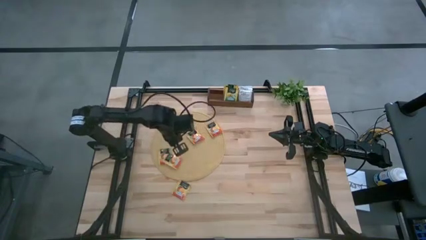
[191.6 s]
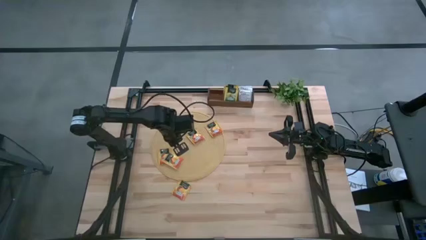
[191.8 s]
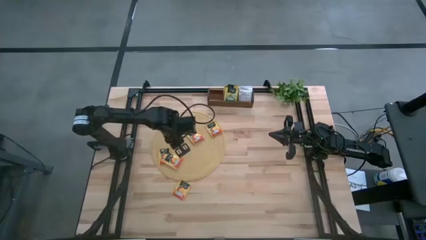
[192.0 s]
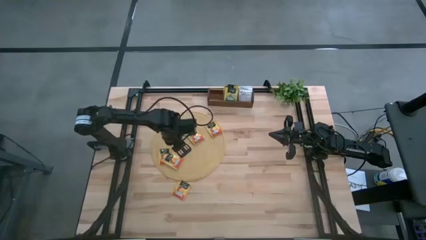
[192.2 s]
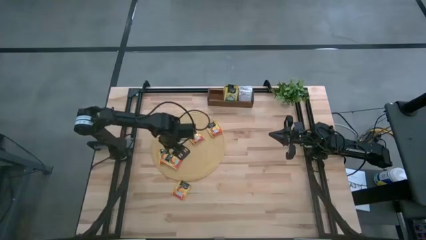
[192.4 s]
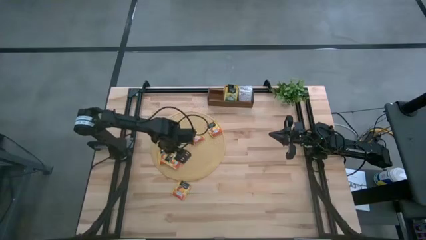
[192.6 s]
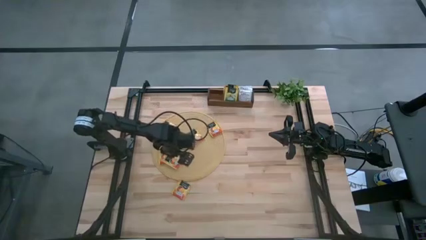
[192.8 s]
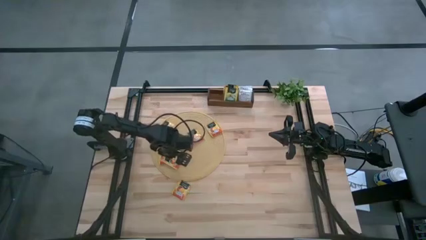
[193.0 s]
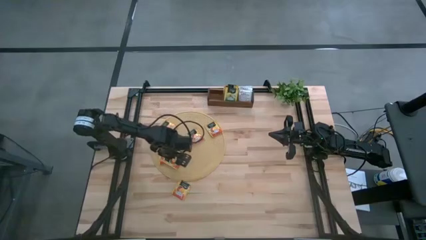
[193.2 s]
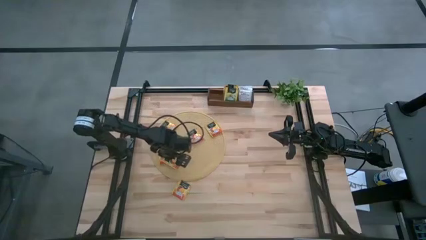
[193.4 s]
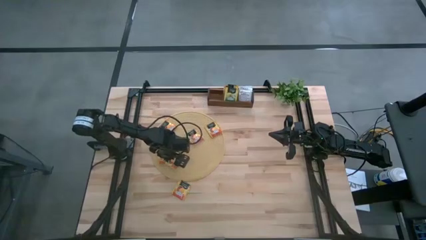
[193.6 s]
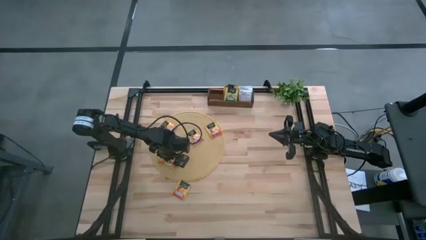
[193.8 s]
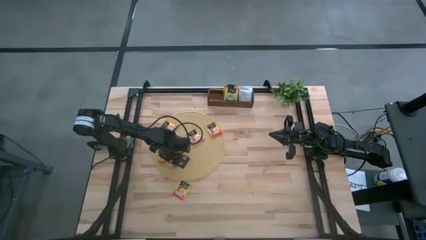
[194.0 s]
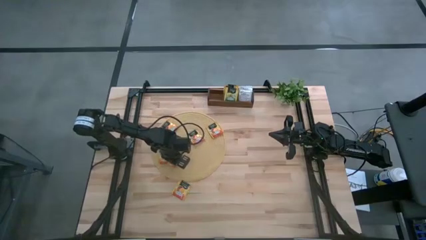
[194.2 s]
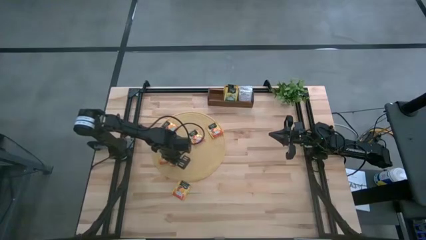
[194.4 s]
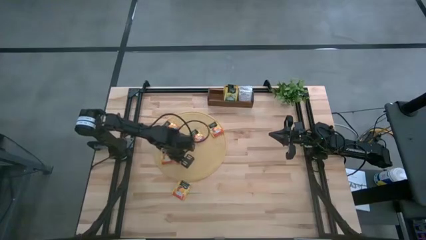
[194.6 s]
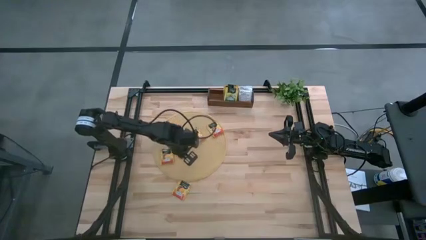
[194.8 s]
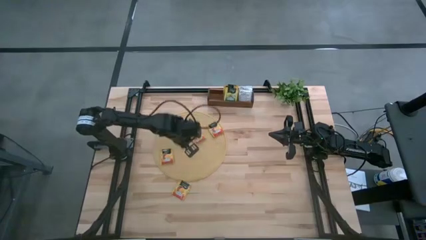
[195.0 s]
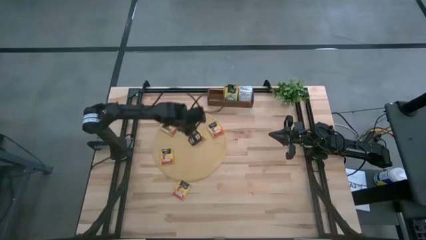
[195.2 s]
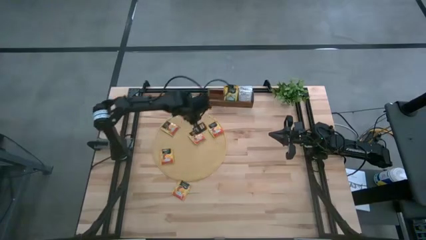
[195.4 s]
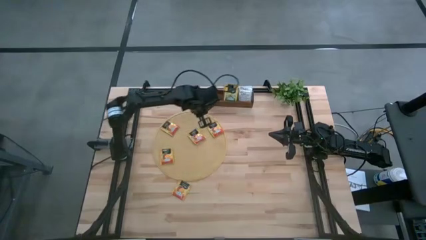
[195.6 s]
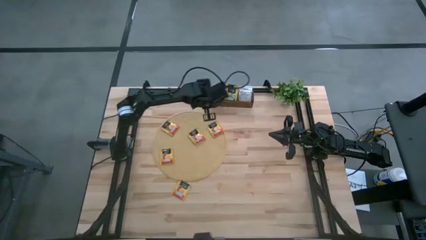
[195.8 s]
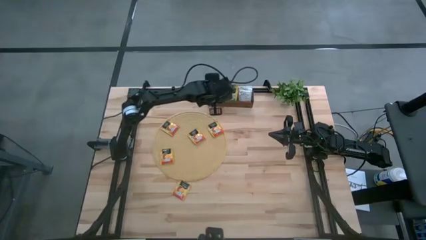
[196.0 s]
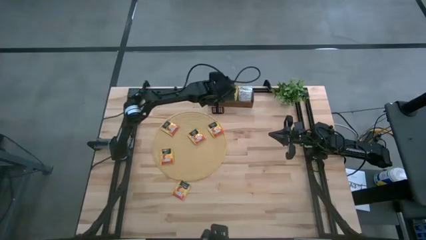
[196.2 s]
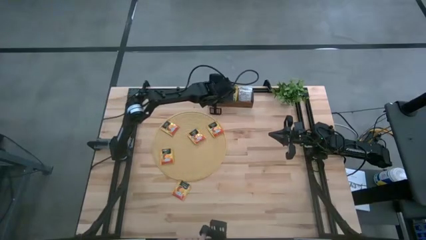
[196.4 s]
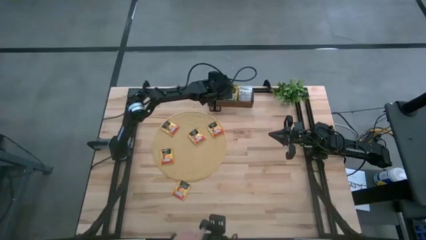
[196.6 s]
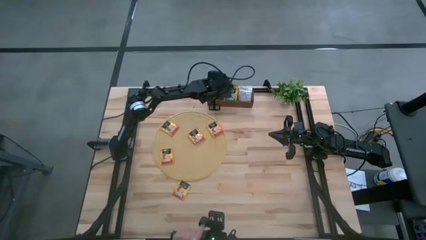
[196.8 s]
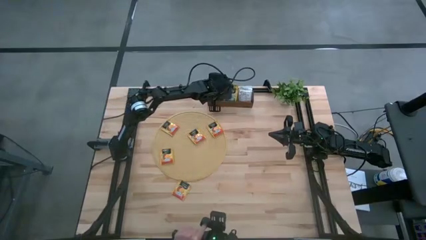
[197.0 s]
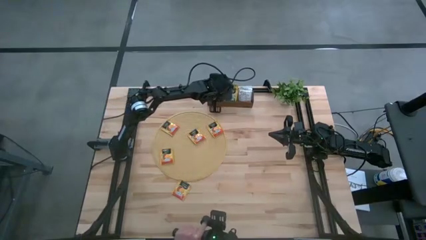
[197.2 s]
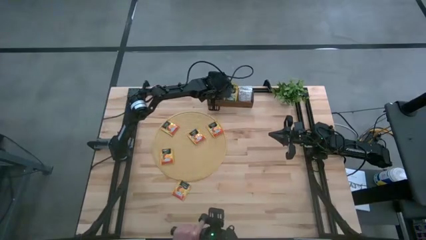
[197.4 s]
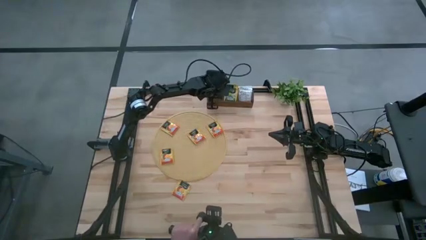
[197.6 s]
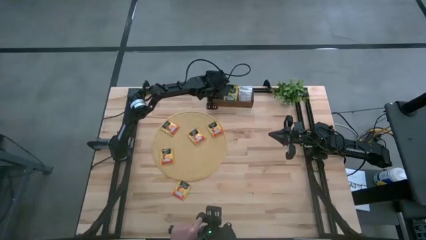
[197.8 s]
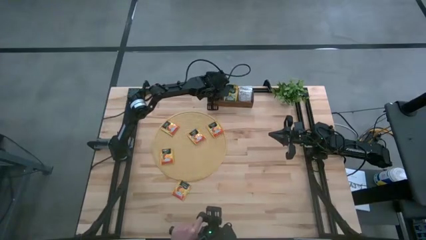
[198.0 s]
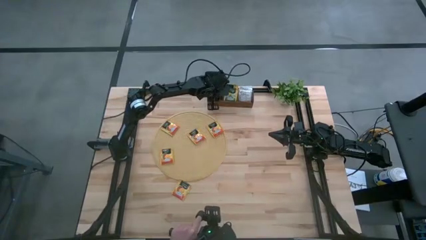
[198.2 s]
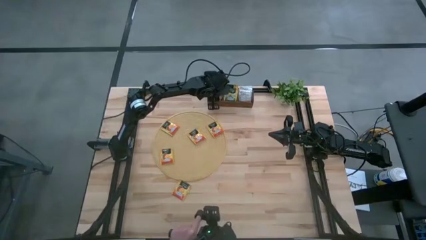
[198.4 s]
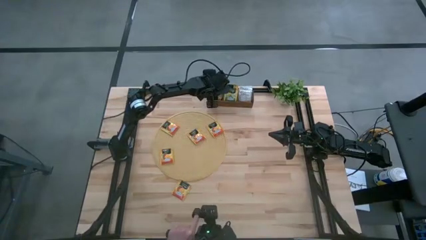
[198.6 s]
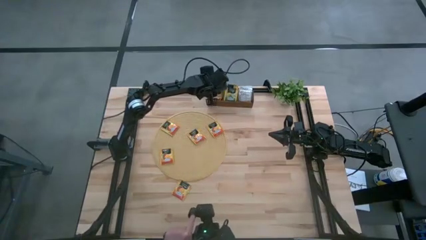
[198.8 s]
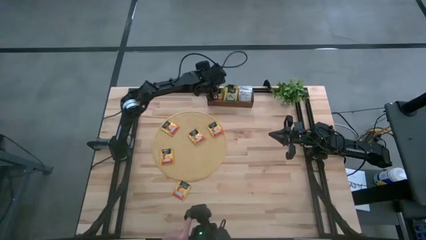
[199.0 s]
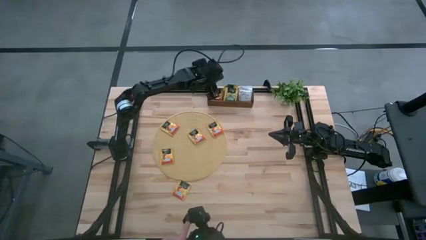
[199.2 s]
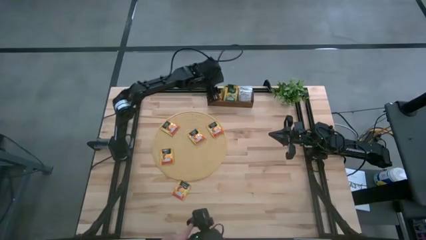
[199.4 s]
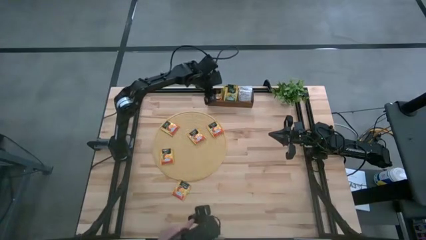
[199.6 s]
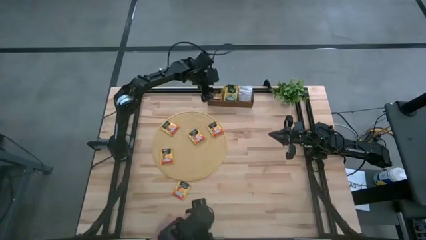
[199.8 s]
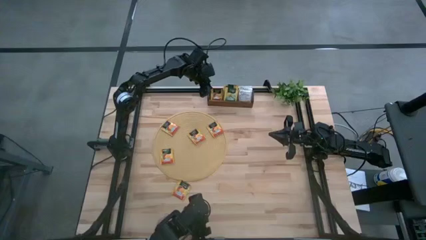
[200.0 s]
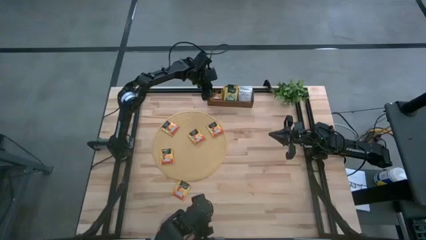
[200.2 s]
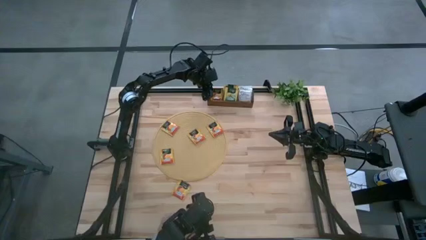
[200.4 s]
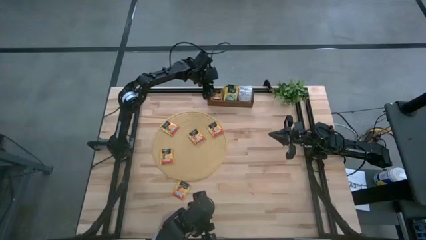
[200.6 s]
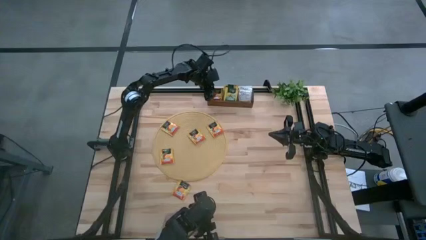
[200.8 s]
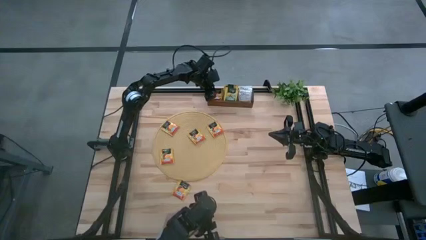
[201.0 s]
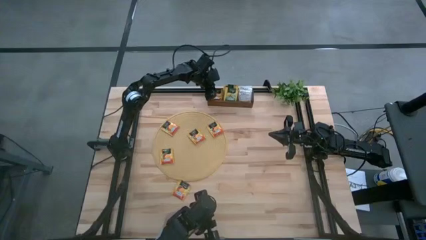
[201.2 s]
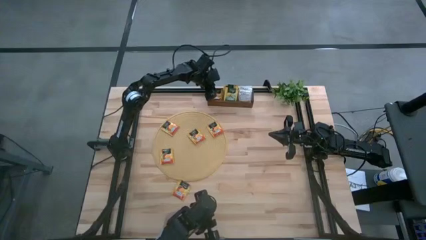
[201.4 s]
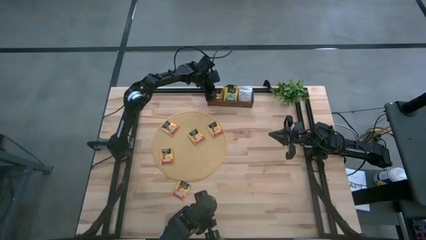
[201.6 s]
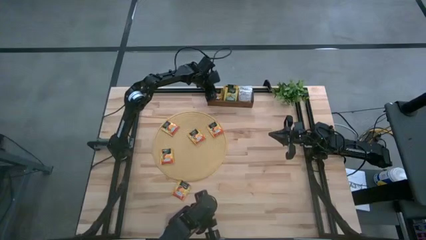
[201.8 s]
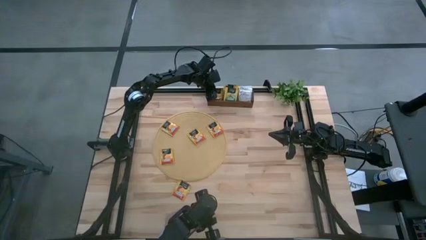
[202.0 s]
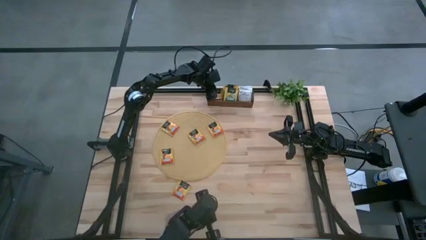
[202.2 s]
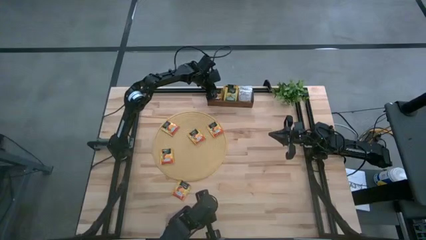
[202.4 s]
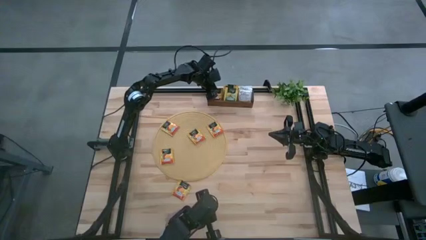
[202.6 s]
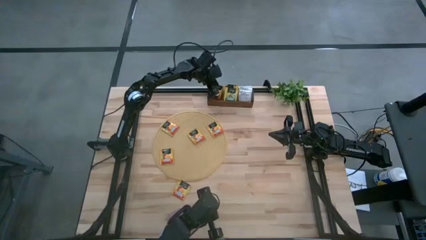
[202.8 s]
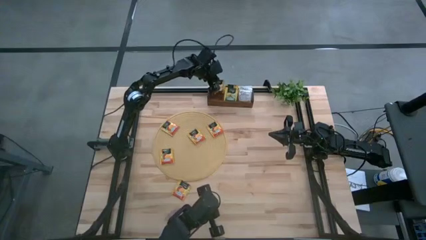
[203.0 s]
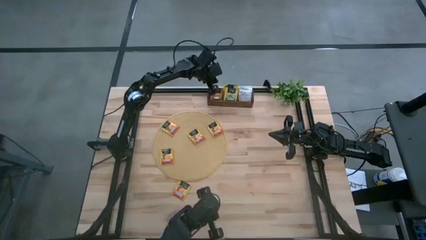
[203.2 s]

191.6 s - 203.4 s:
Task: Pick & Place Tea
Put the orange tea bag into the left section of the wooden organizer

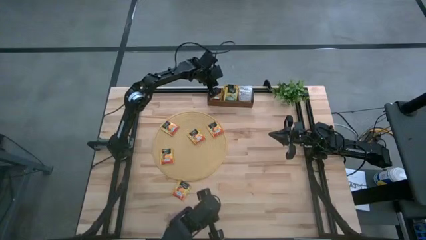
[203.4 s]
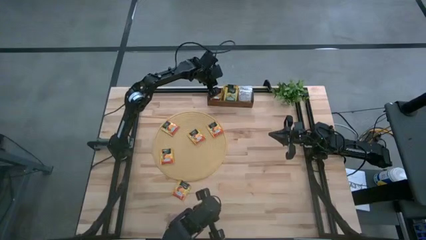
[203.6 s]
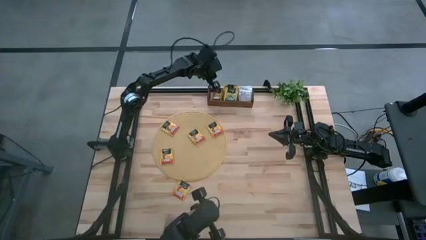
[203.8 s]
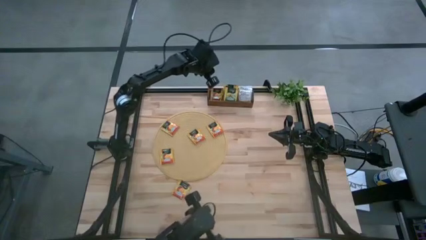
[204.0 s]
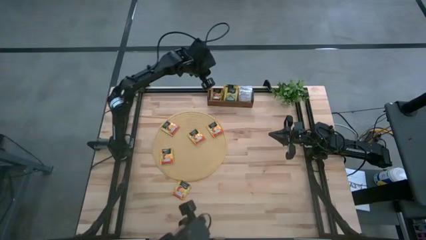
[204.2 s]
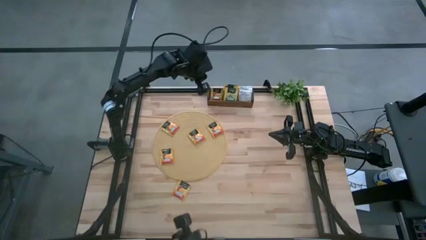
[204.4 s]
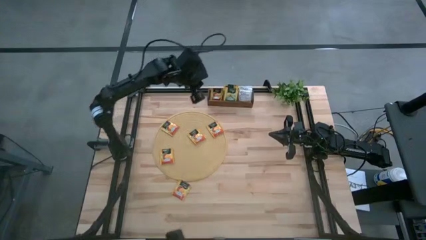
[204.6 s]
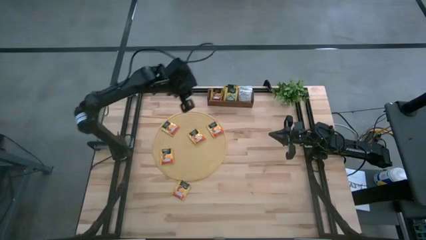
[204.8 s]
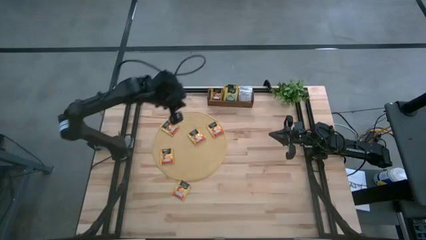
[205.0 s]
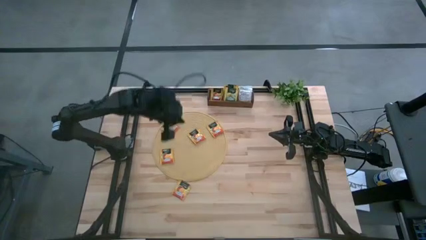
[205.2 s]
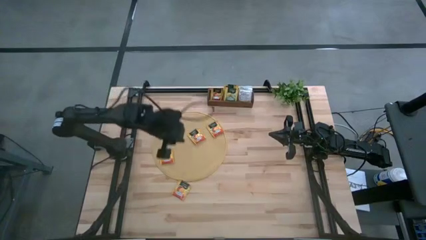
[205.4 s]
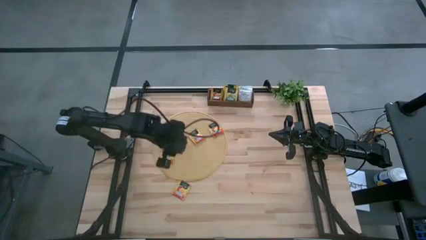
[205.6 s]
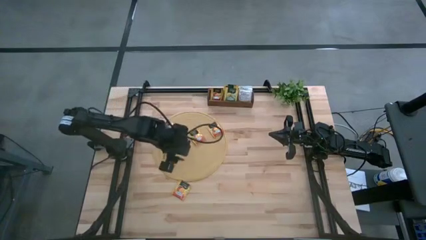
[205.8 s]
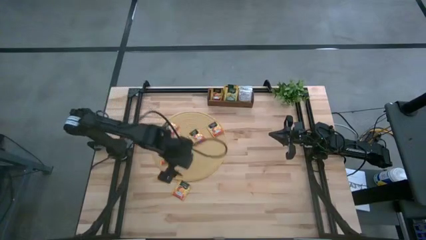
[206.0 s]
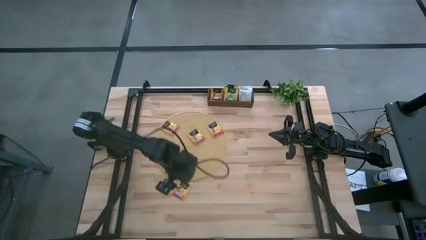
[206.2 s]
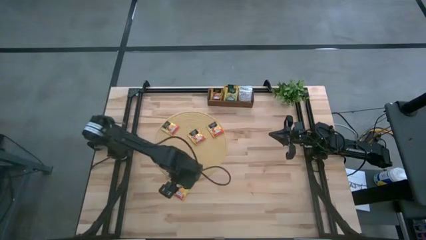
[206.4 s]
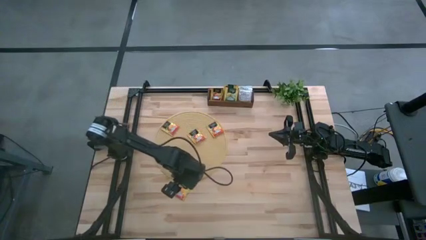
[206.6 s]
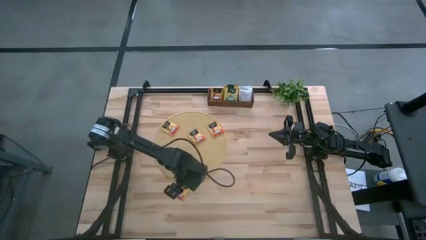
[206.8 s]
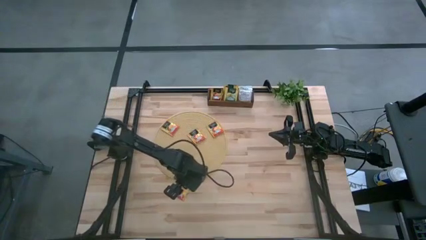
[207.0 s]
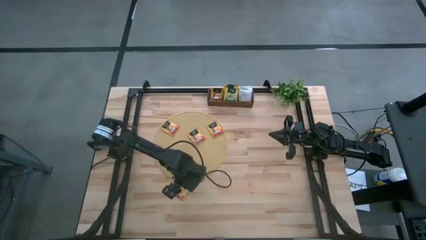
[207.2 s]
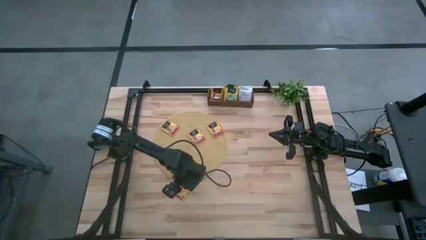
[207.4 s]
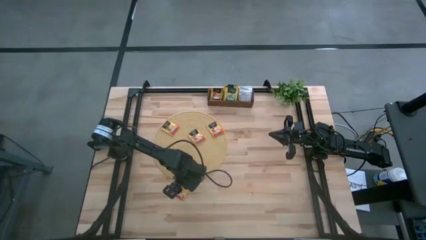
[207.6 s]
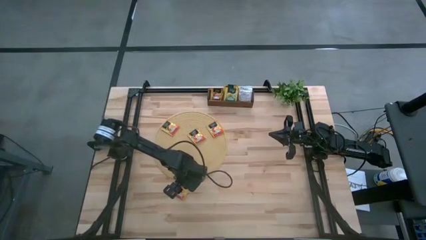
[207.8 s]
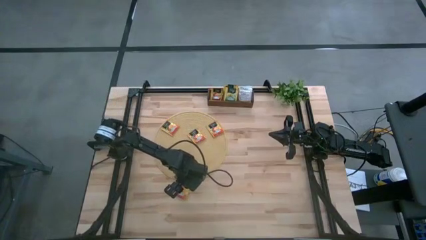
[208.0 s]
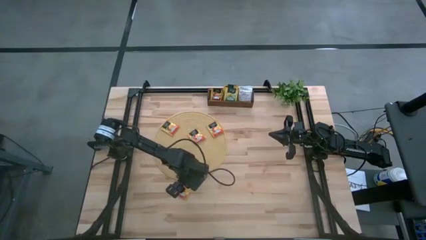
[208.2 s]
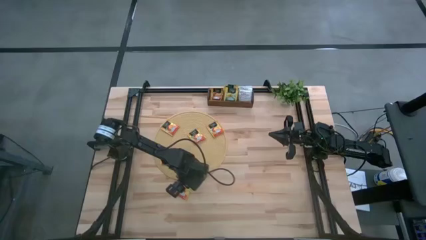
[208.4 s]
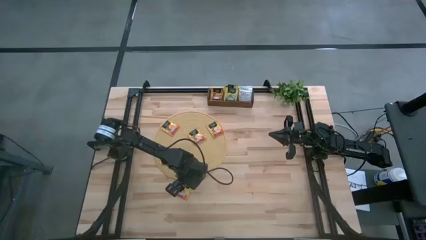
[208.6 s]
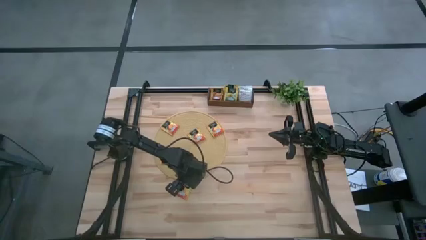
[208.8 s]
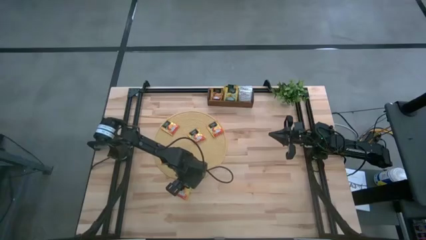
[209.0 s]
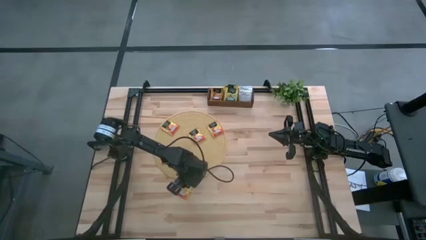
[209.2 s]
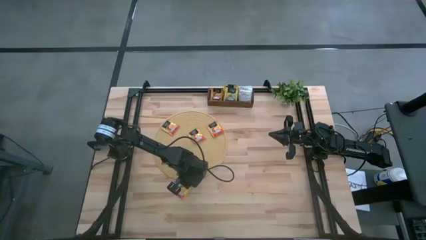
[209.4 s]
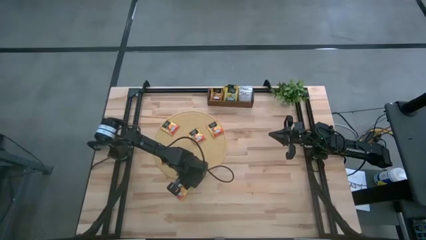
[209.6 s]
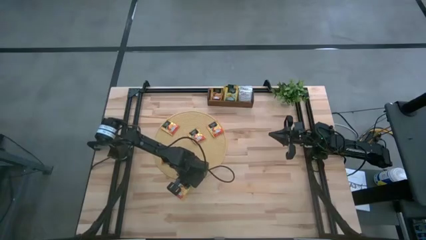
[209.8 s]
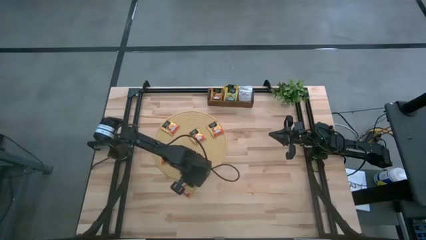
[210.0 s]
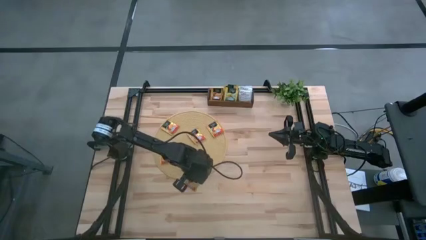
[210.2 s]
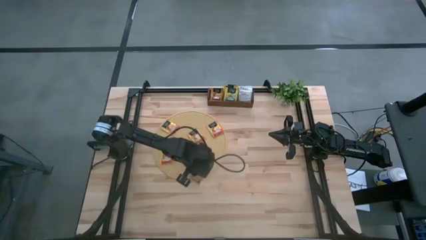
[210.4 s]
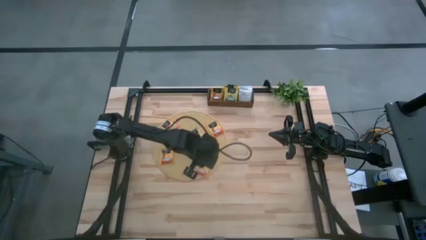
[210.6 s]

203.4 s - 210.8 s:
Put the orange tea bag into the left section of the wooden organizer
